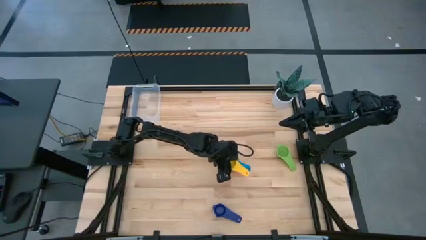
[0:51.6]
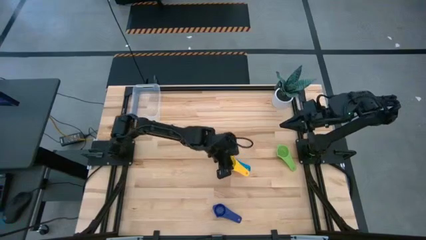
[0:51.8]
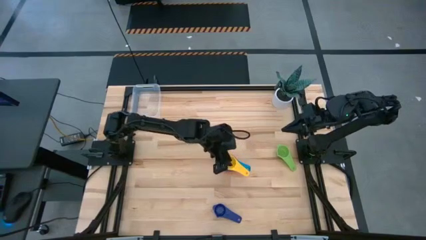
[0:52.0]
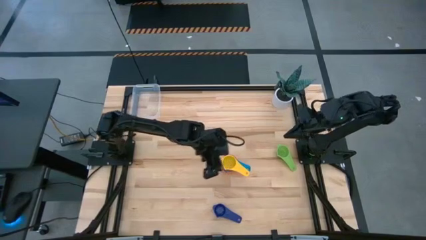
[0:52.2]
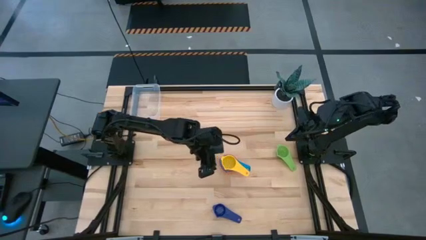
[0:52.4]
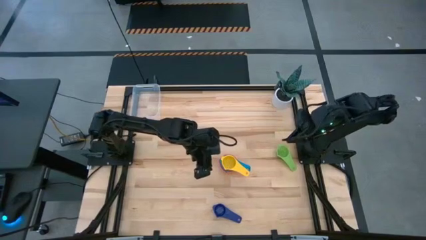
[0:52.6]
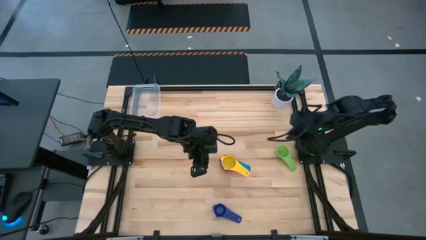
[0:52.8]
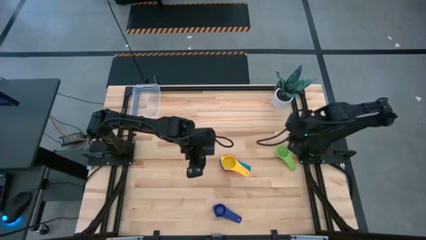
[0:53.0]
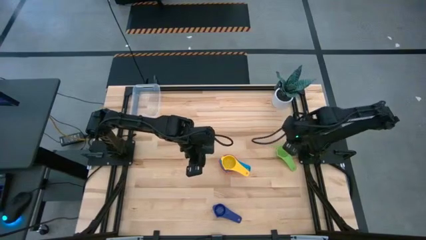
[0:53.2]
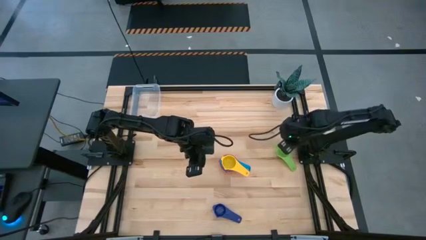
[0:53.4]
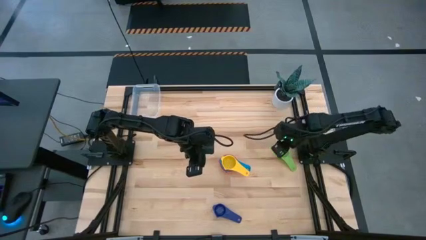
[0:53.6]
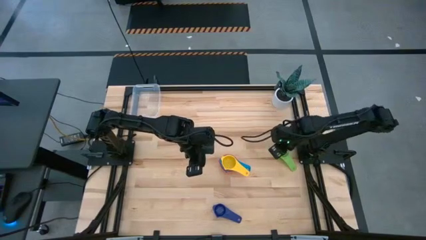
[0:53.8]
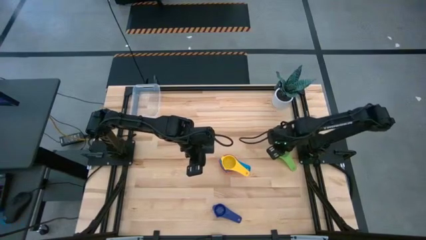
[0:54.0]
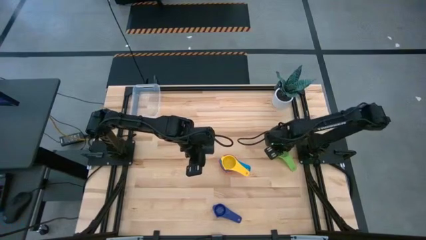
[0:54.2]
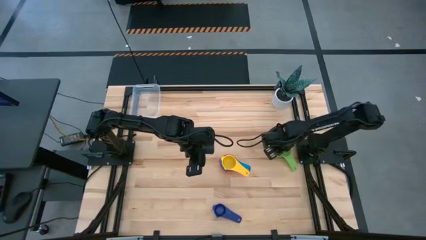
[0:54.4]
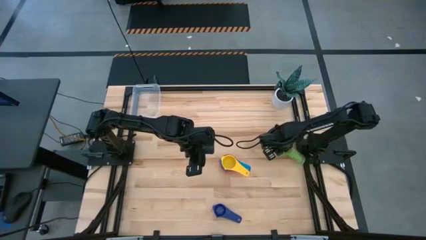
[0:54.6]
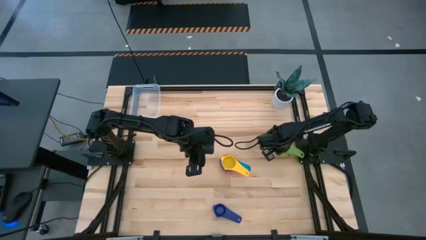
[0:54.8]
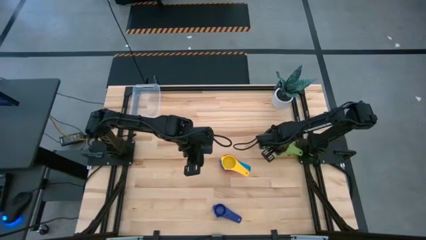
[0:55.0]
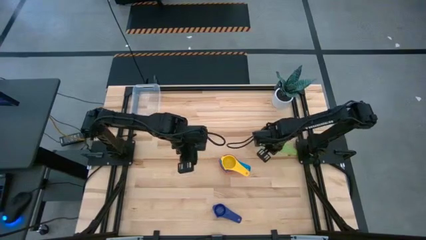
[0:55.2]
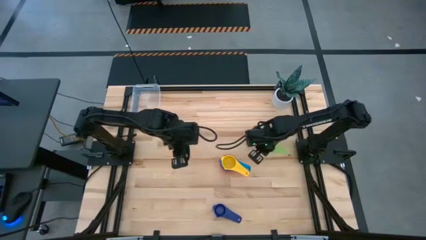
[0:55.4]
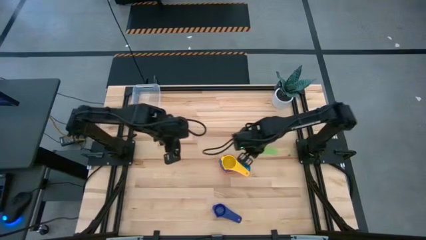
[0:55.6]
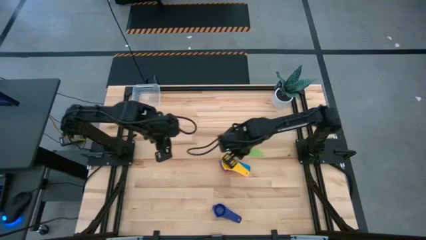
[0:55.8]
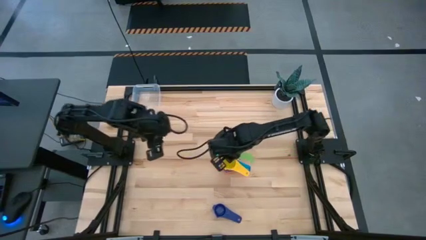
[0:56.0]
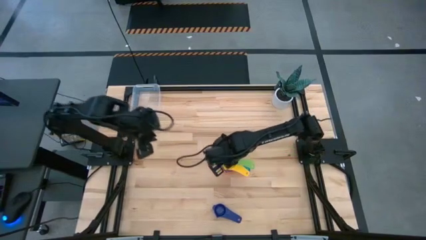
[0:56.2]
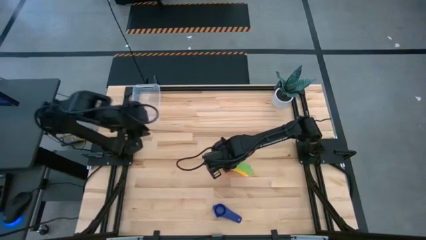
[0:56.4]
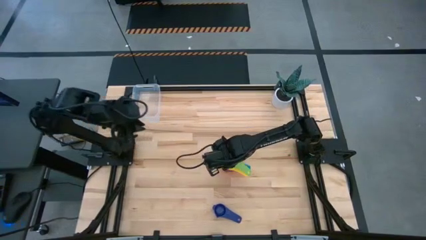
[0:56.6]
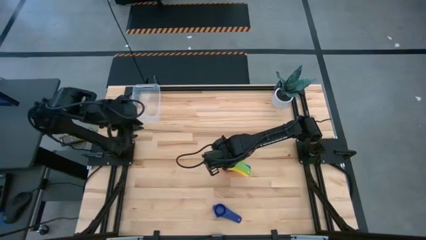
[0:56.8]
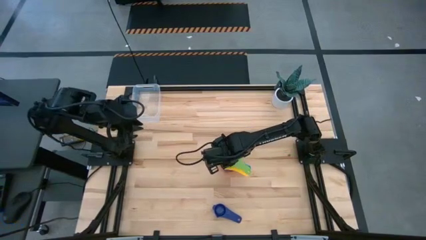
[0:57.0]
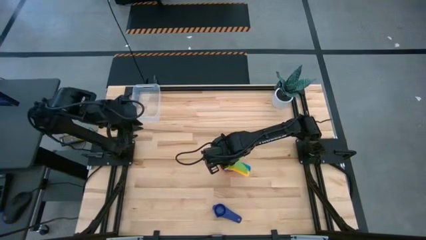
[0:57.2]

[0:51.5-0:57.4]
Task: Nest measuring cups in basket
Stack the green measuring cup on top of the yellow measuring cup

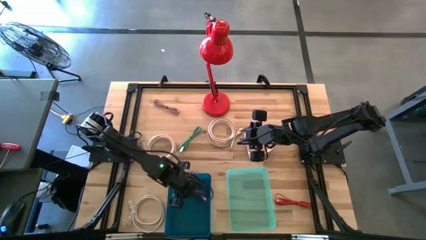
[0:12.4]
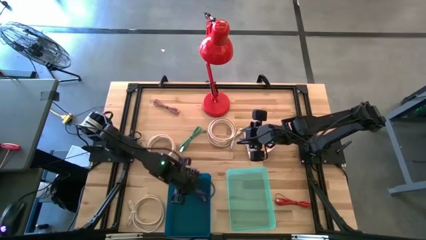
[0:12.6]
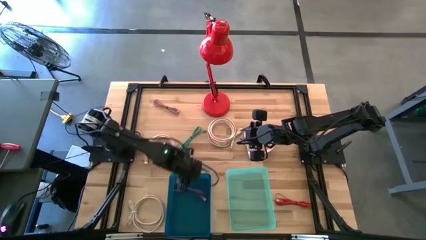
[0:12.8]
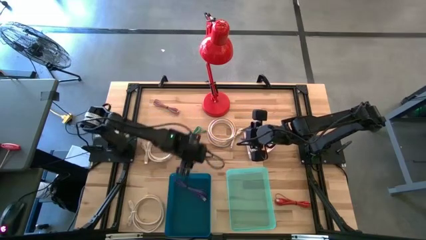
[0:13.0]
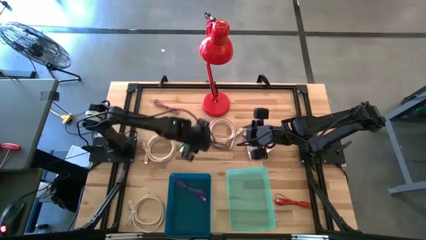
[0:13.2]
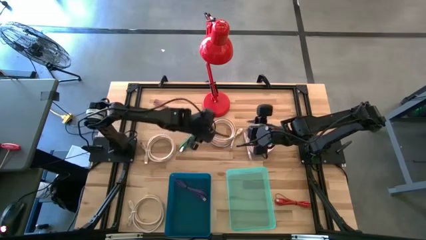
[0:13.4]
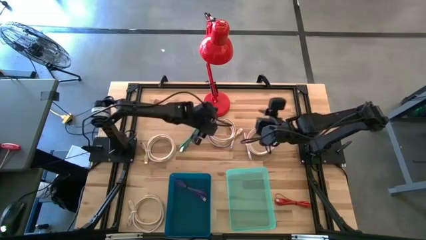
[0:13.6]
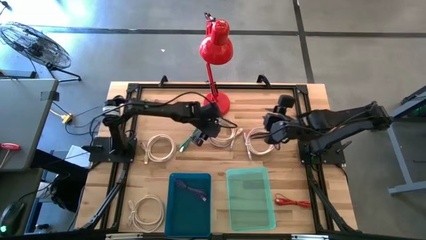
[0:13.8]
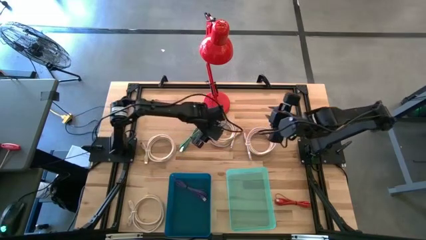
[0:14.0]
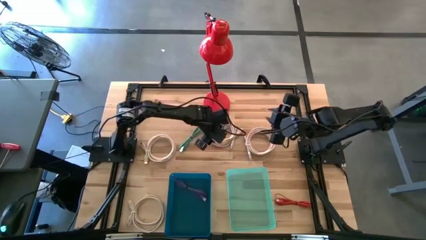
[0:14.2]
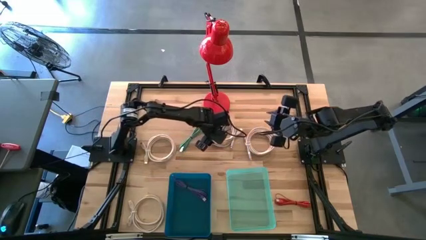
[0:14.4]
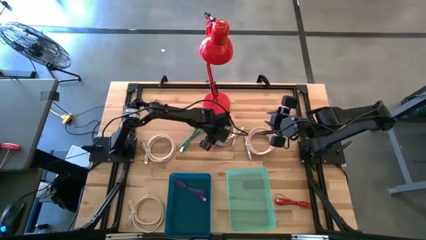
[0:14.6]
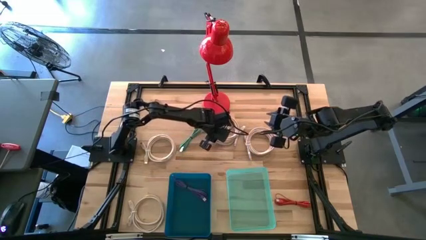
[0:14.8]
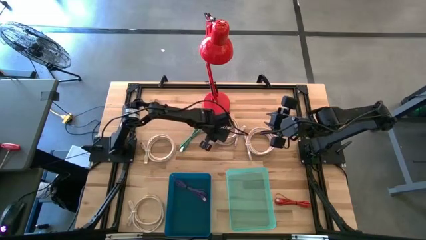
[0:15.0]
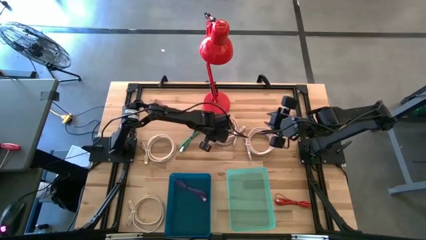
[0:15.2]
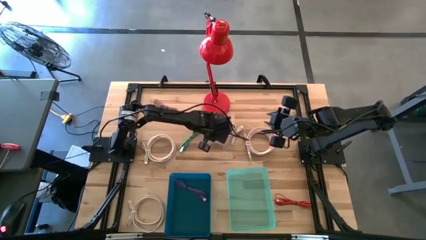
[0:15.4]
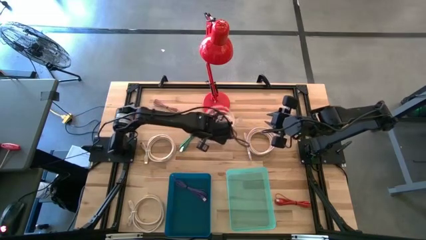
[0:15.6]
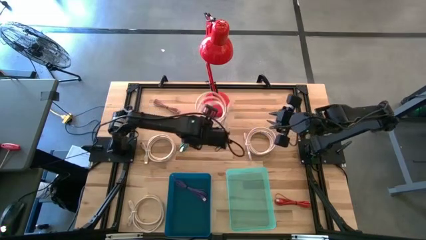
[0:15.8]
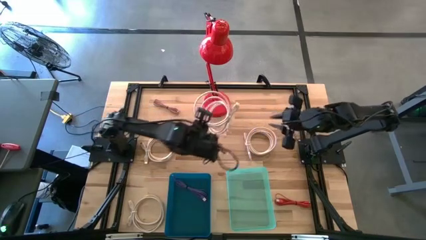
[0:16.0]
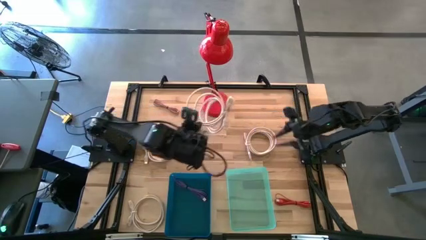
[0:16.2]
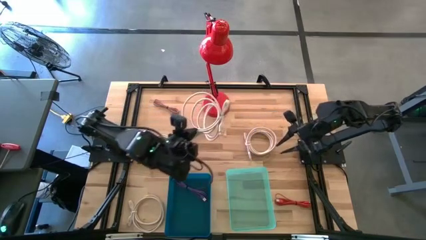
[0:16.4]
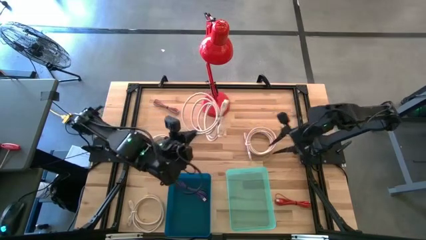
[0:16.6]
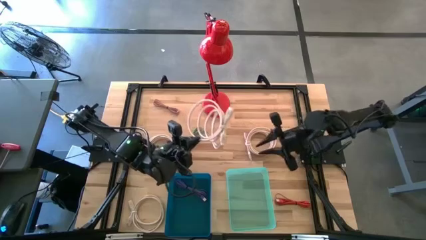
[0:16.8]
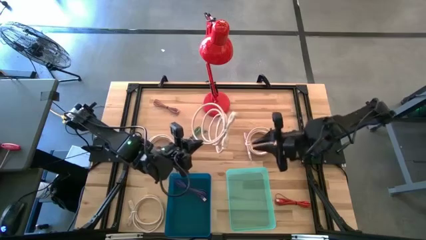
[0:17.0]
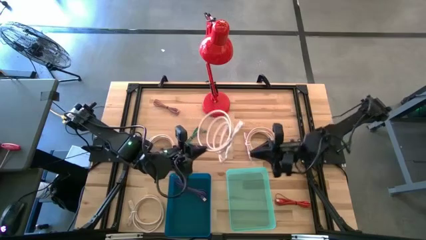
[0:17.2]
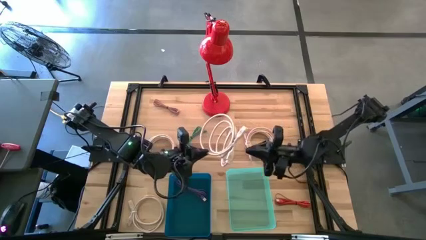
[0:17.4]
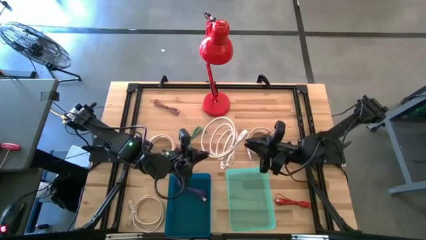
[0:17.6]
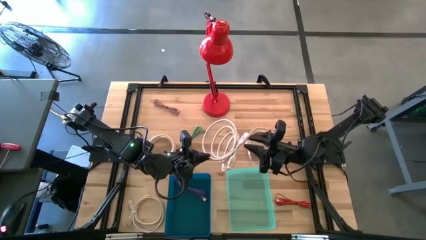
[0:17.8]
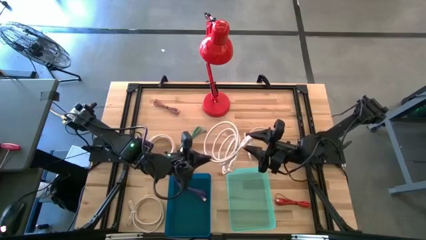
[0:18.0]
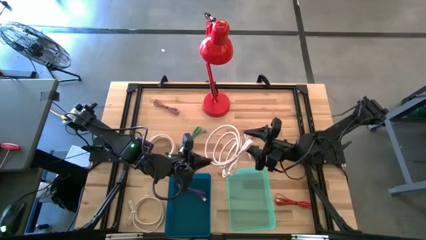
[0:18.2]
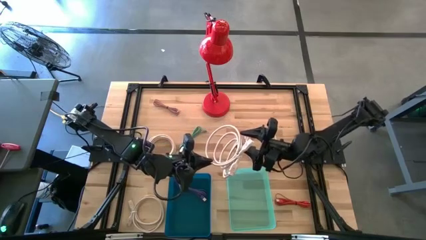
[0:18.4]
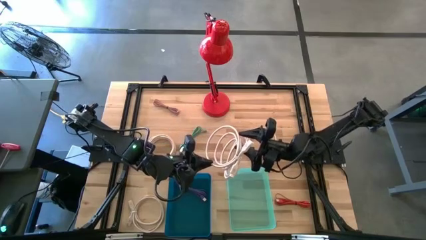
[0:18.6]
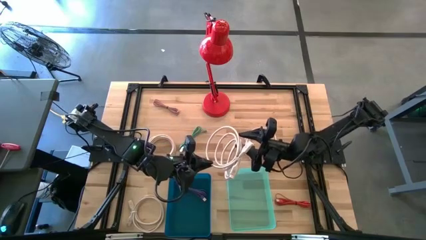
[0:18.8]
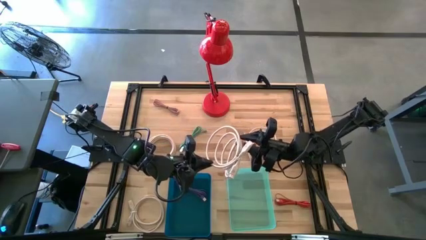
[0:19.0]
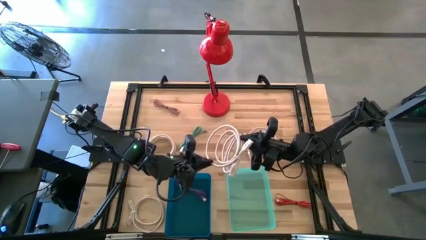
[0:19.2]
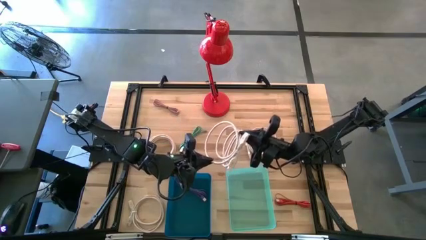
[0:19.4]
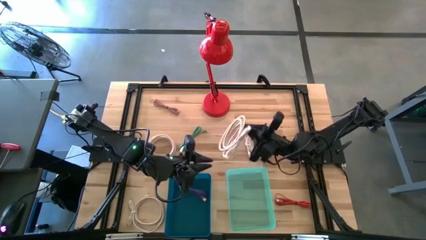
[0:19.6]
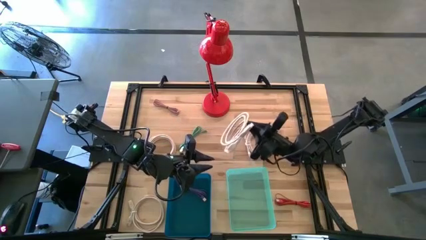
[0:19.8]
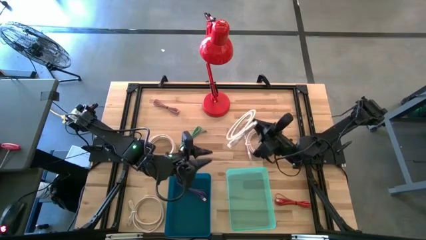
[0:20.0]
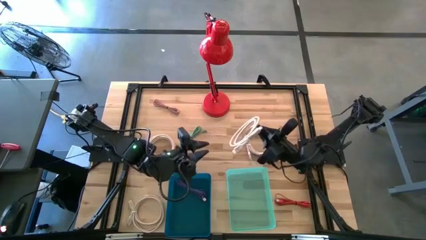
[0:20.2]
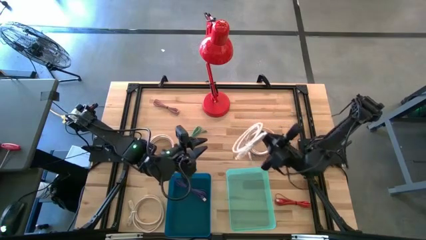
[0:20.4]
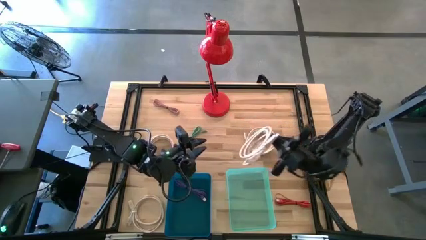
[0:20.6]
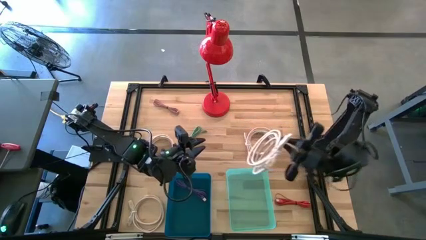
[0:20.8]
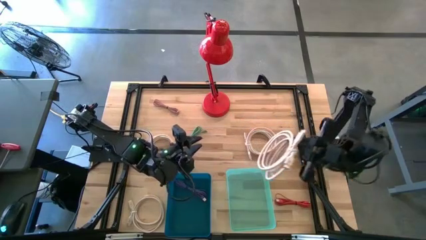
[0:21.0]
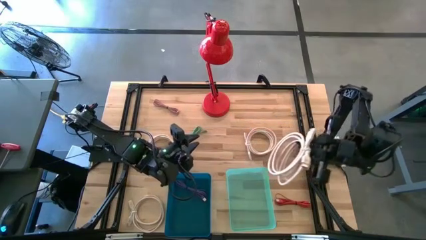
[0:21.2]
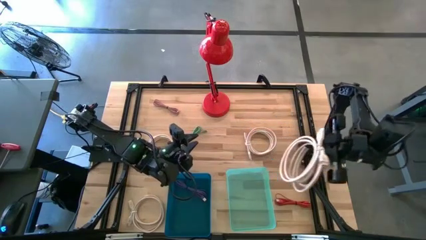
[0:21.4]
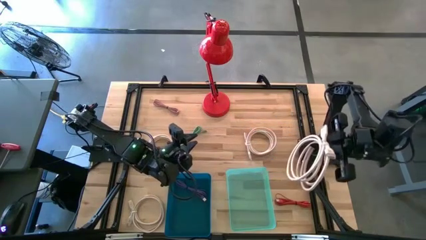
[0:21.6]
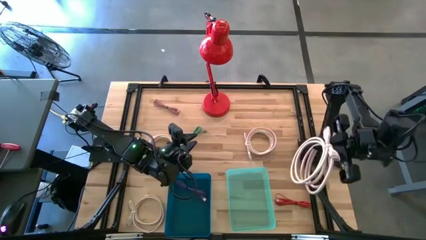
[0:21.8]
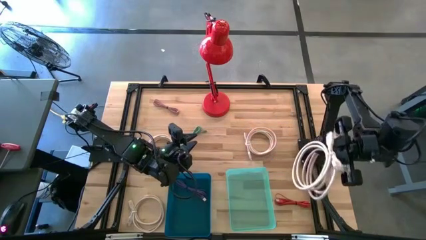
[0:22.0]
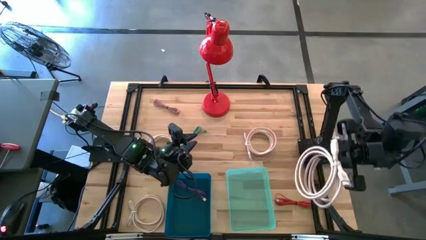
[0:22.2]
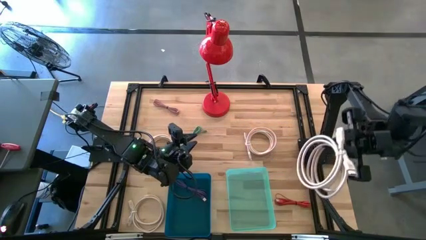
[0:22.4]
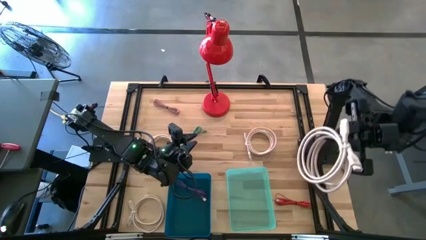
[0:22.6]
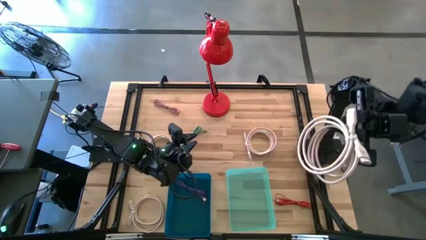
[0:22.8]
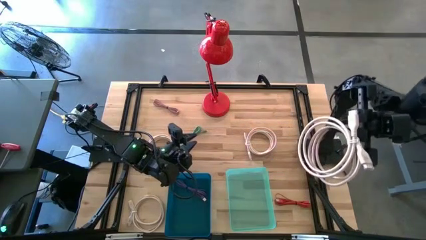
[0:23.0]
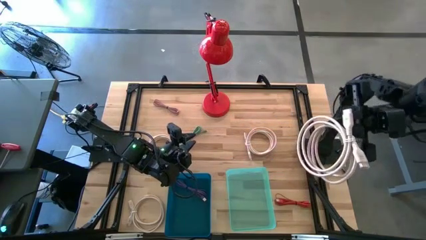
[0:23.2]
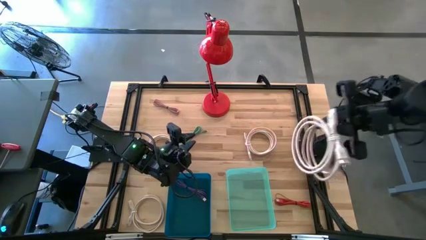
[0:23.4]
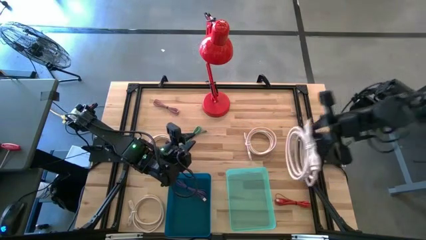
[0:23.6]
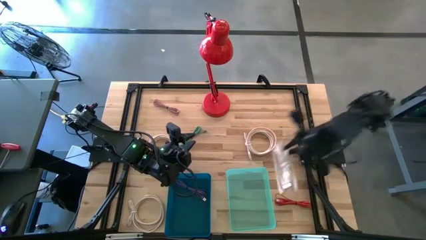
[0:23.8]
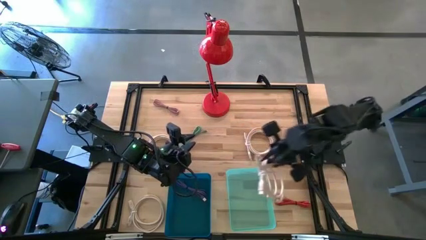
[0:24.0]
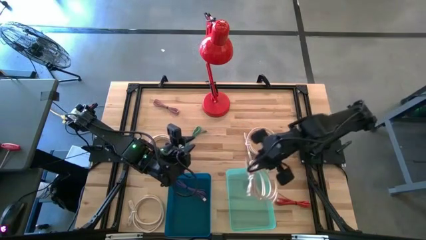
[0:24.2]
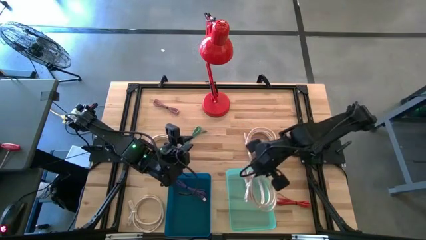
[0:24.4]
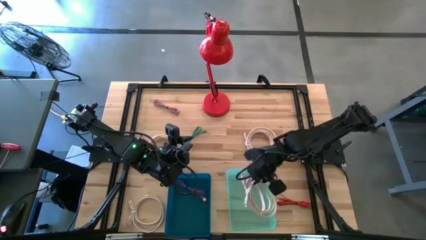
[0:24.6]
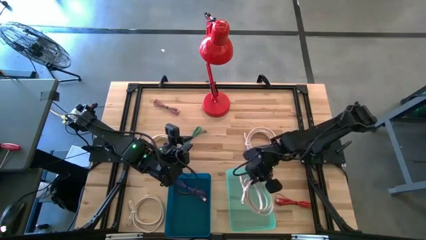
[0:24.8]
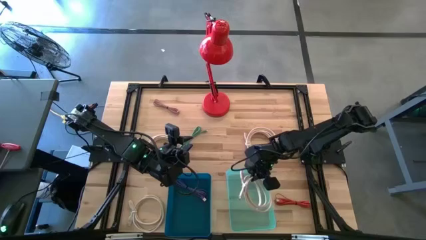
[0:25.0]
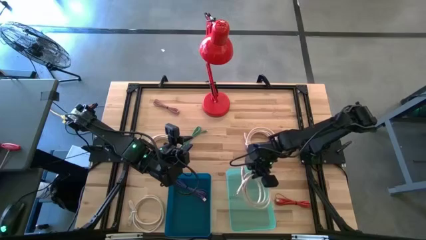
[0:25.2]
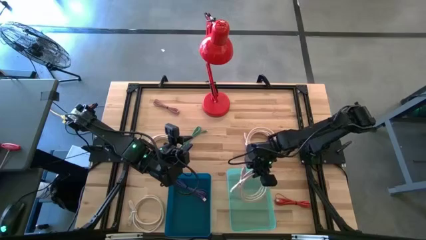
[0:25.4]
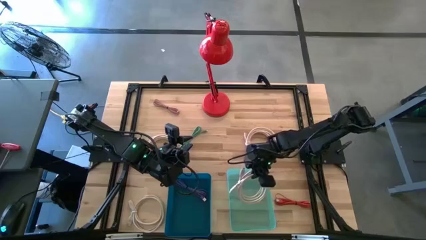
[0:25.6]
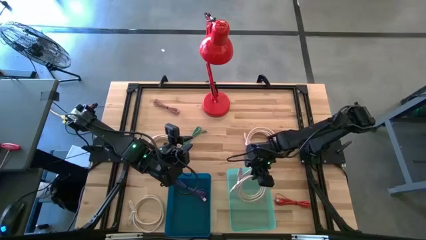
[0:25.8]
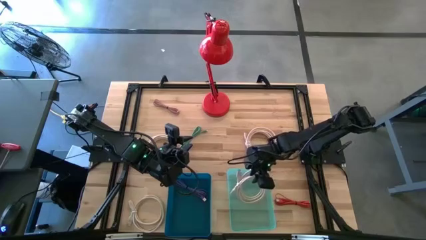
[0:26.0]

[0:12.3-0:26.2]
Task: Pick & Place USB Port
Put the white USB cable into the green bin
